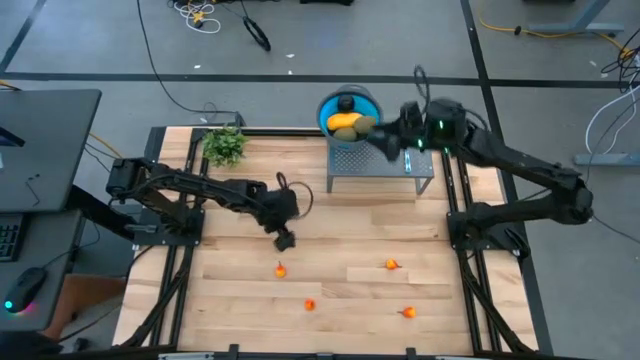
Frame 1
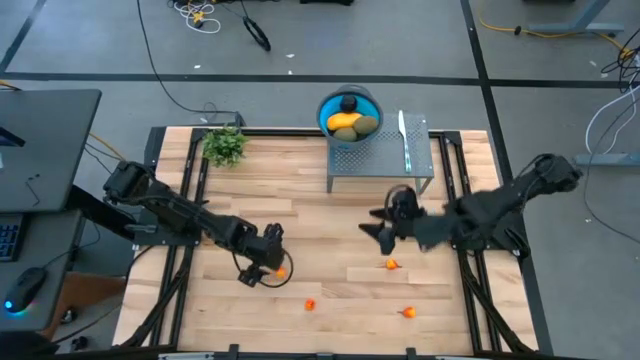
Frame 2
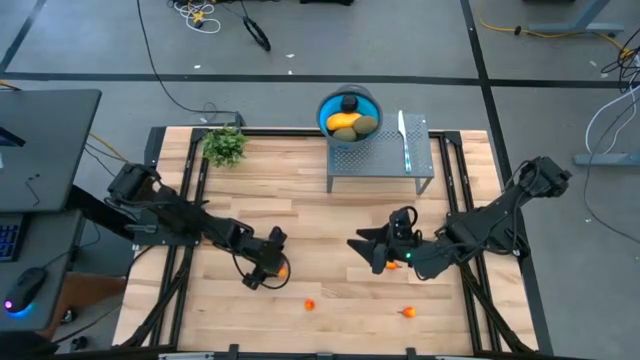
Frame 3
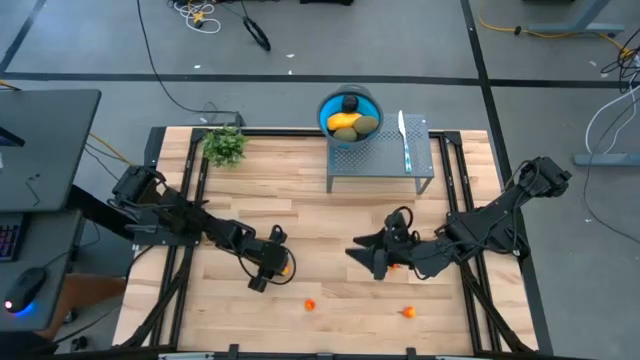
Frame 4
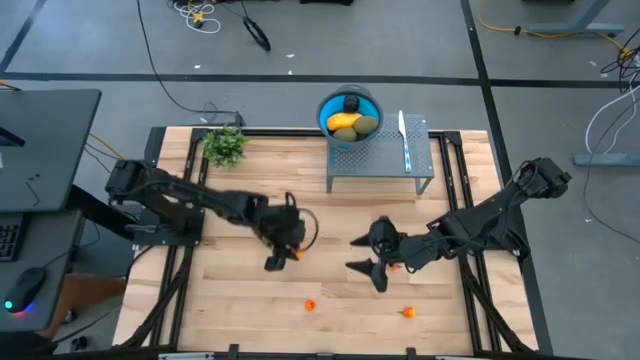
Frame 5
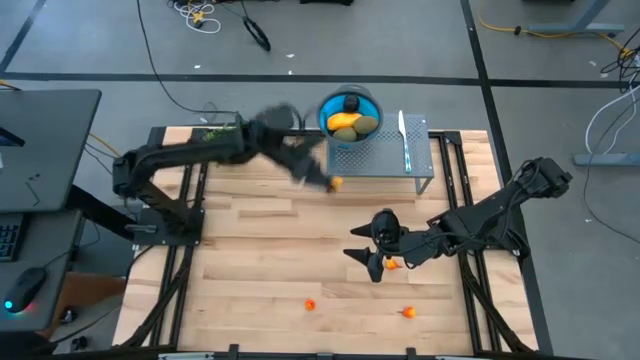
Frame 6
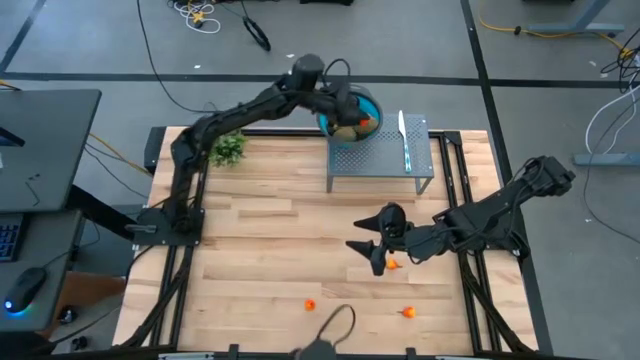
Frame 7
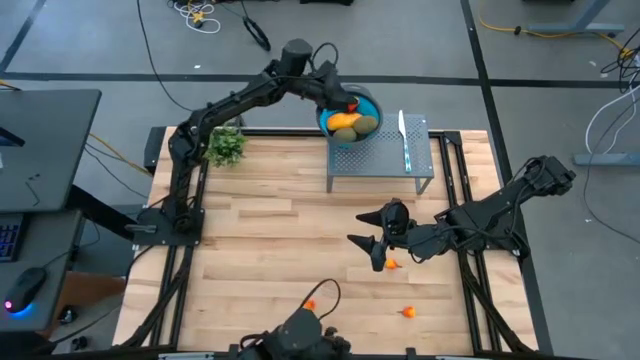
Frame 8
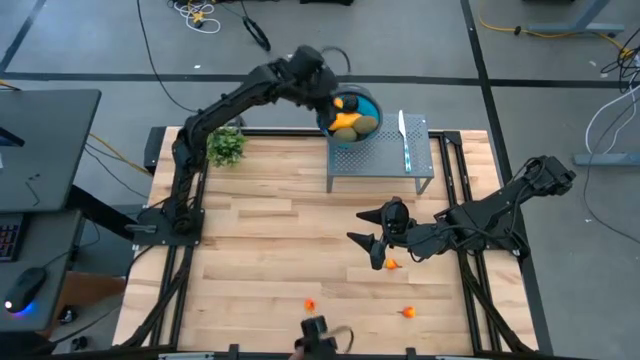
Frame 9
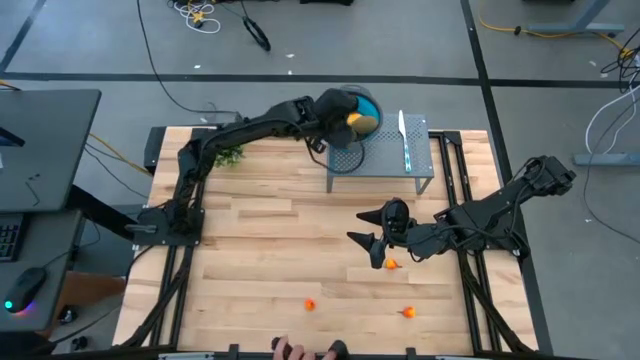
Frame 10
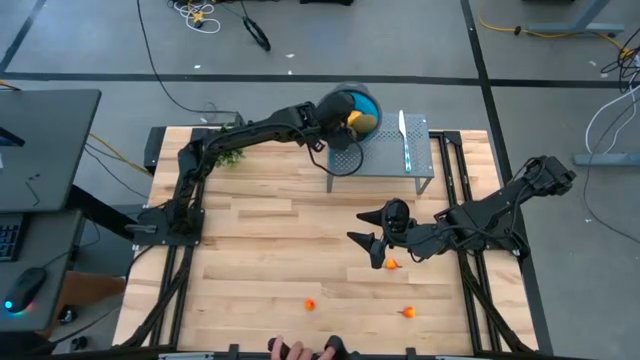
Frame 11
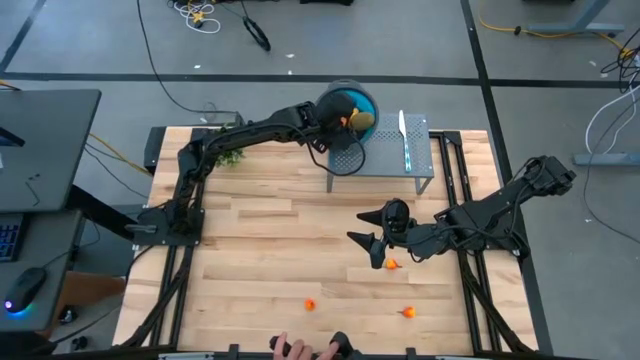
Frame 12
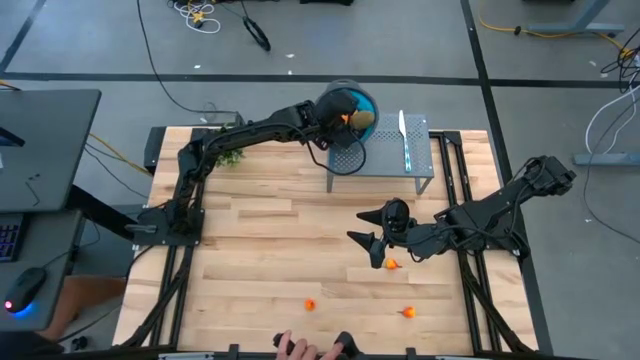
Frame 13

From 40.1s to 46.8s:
Task: Pick & Place Fruit
Put the pear into the strainer bowl

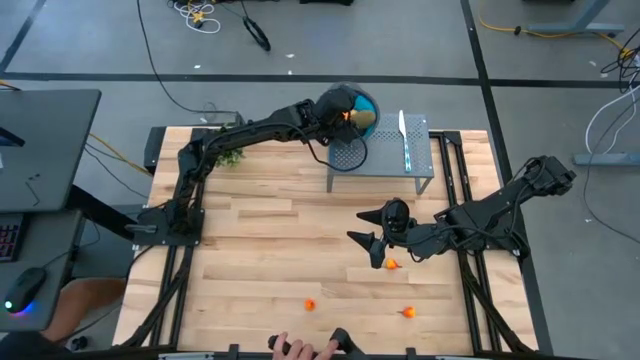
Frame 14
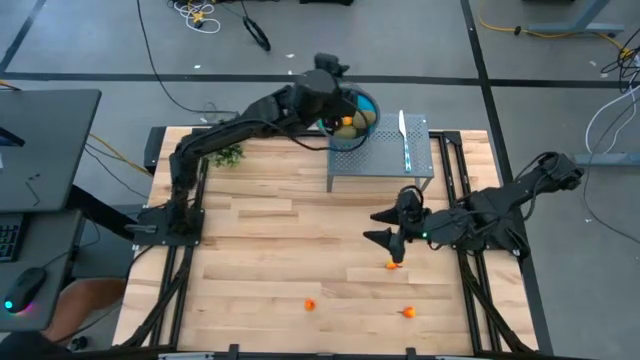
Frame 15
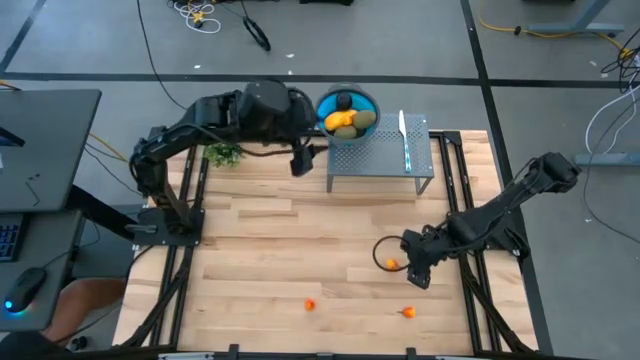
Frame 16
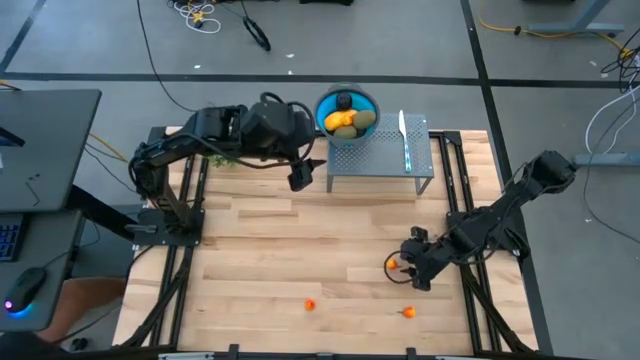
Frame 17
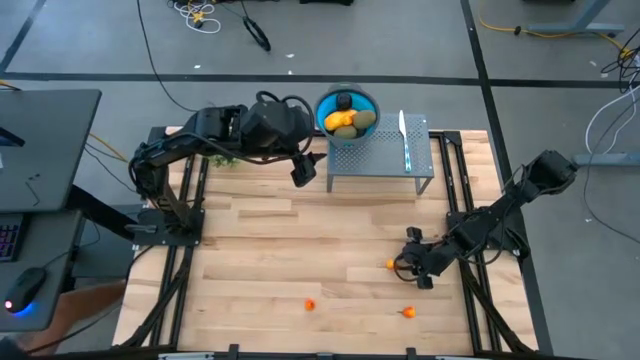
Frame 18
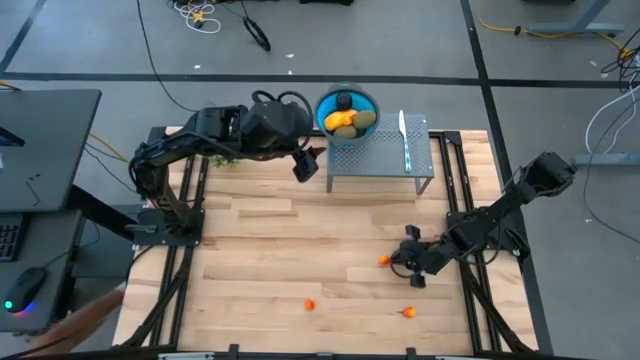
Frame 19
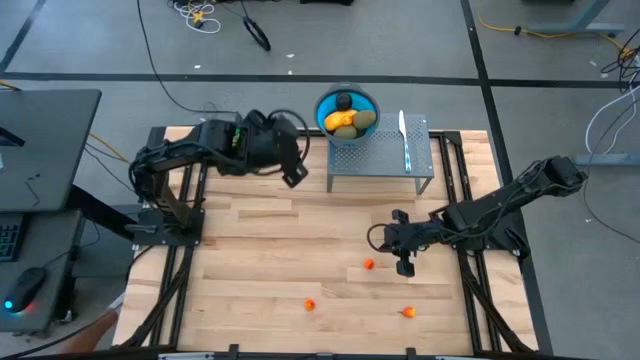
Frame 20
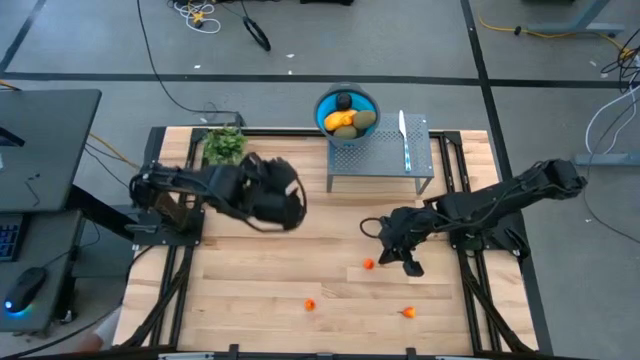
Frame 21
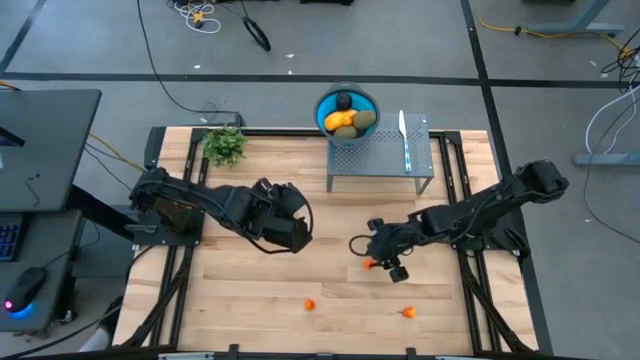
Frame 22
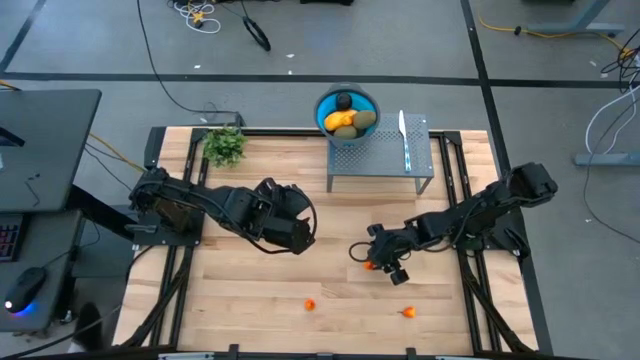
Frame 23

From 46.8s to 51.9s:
Put the pear into the strainer bowl

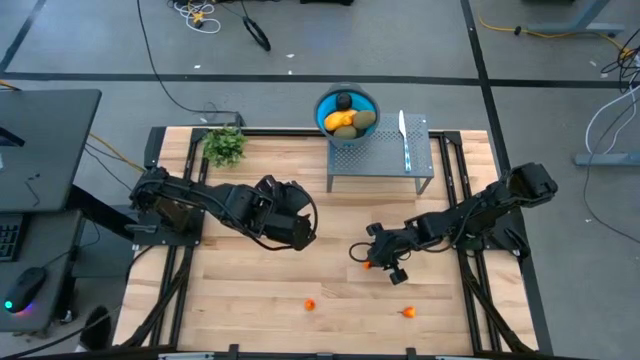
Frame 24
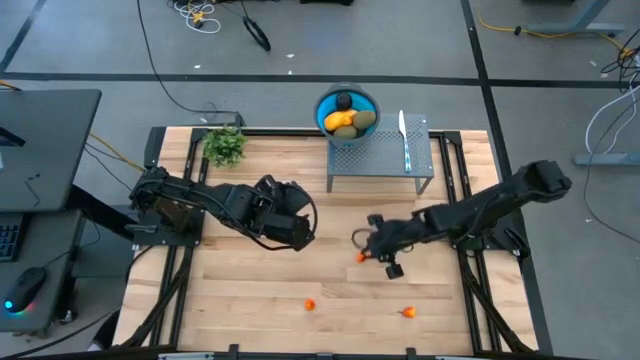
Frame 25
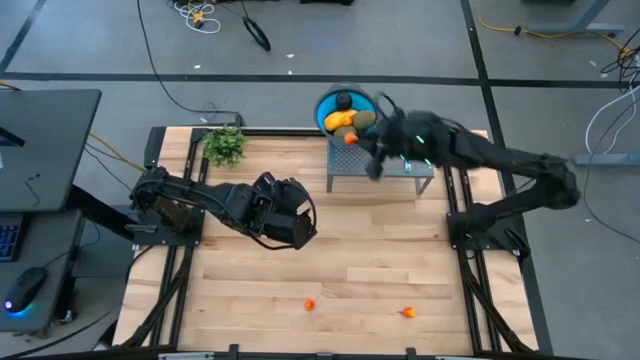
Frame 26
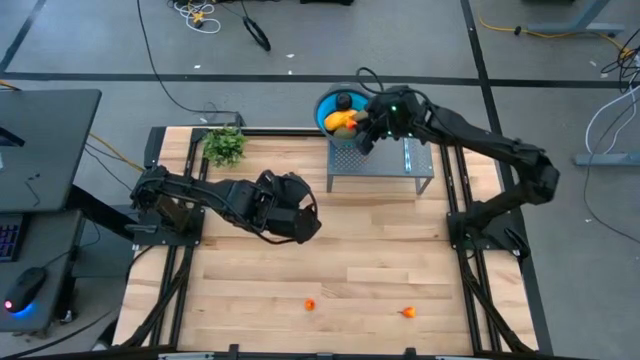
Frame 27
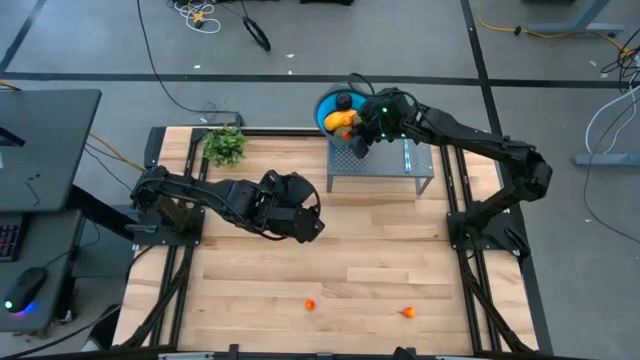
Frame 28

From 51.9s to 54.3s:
Put the pear into the strainer bowl

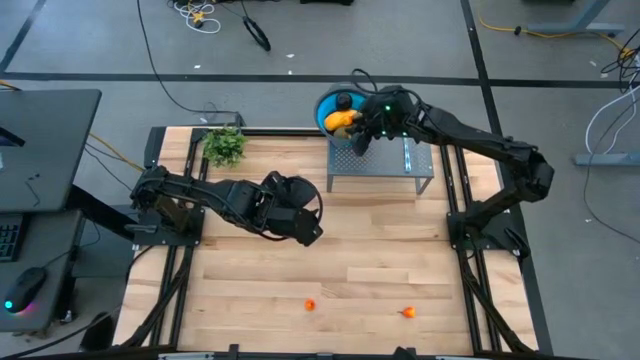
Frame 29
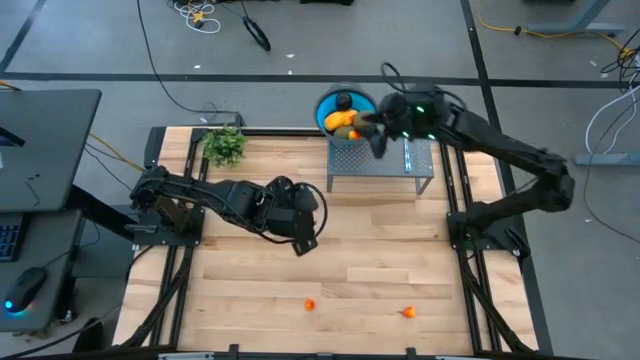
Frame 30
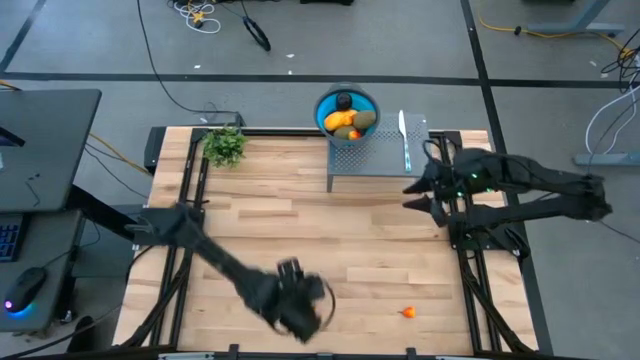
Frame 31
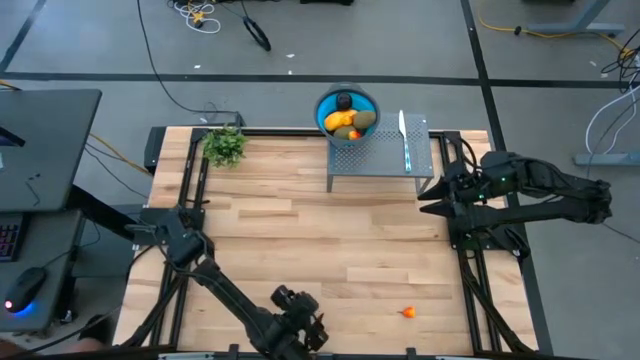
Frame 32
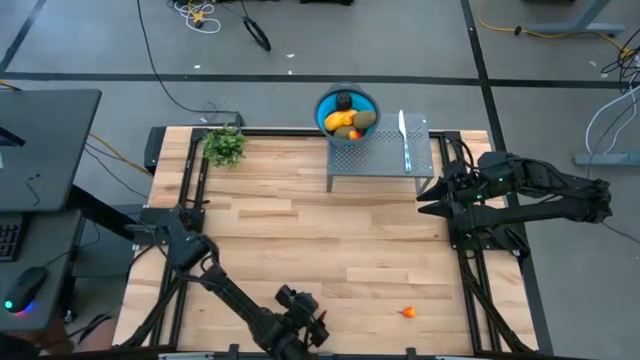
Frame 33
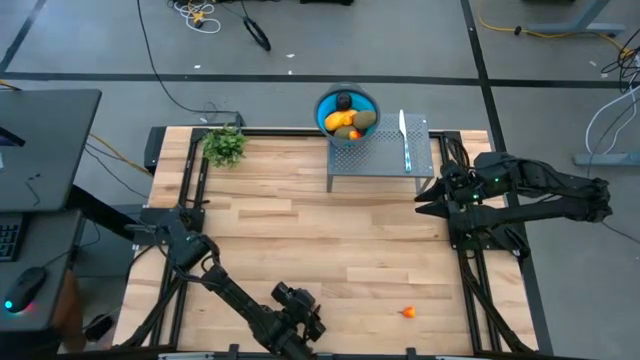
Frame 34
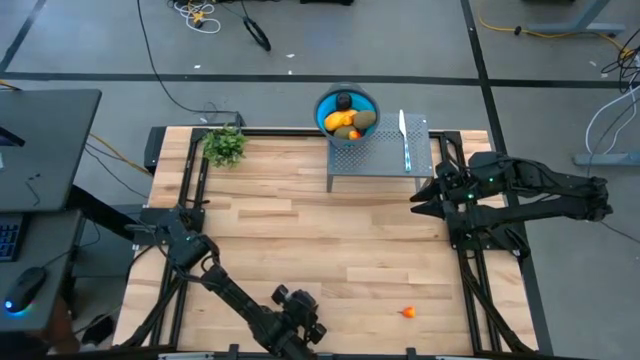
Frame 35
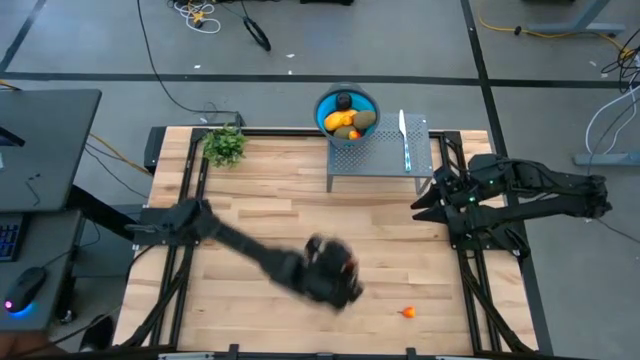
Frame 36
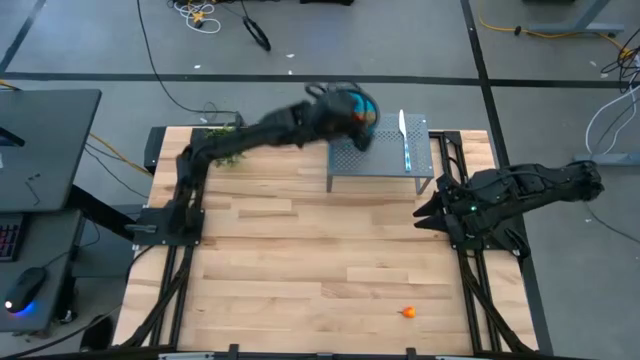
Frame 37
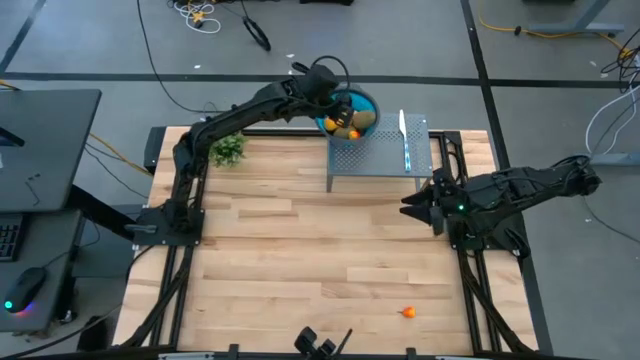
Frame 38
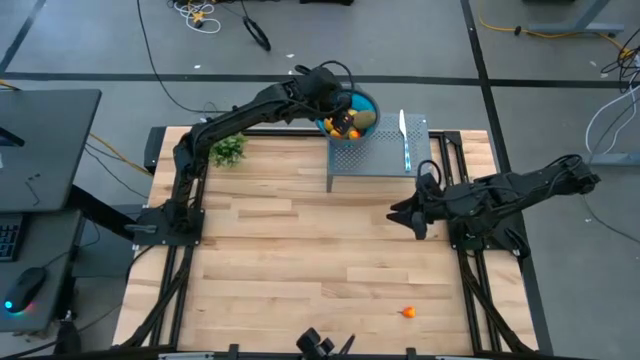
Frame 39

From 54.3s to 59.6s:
Put the pear into the strainer bowl

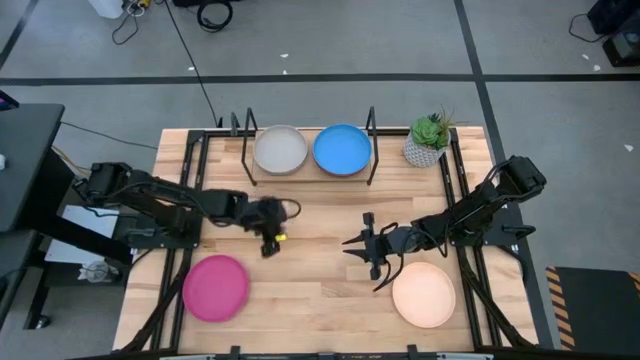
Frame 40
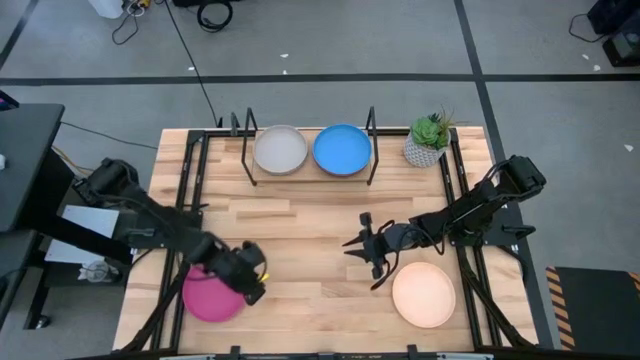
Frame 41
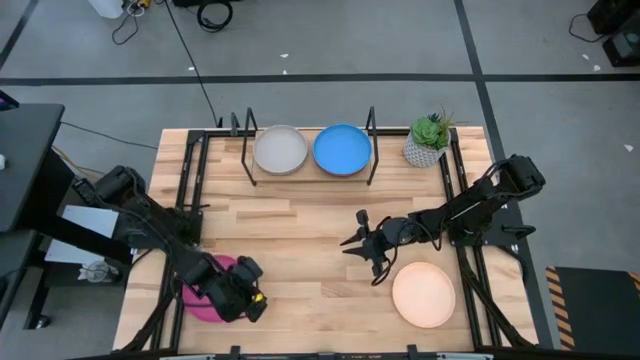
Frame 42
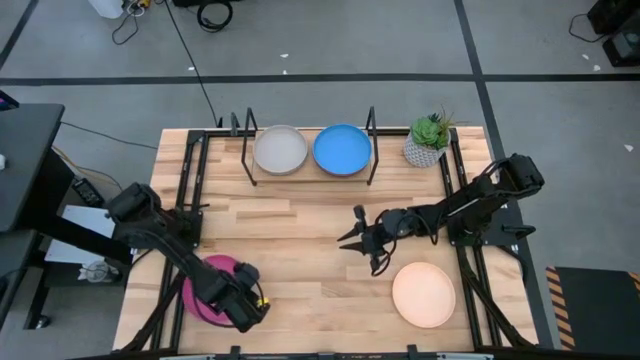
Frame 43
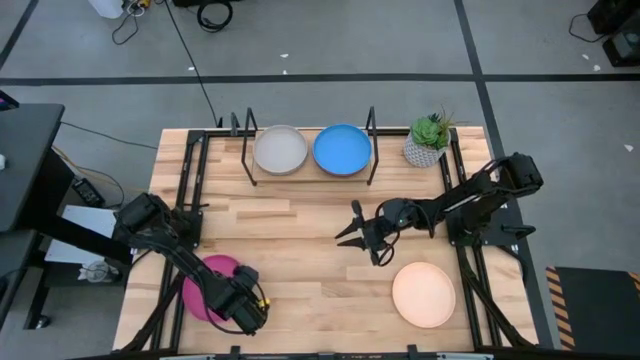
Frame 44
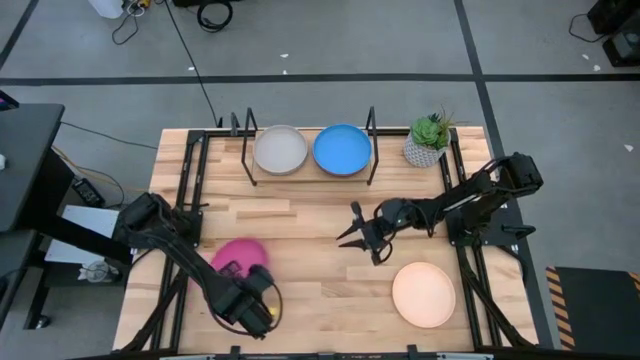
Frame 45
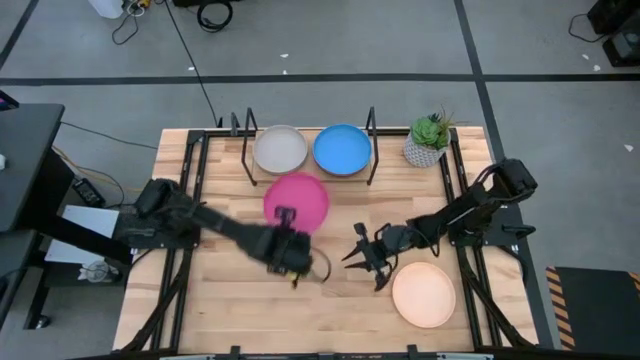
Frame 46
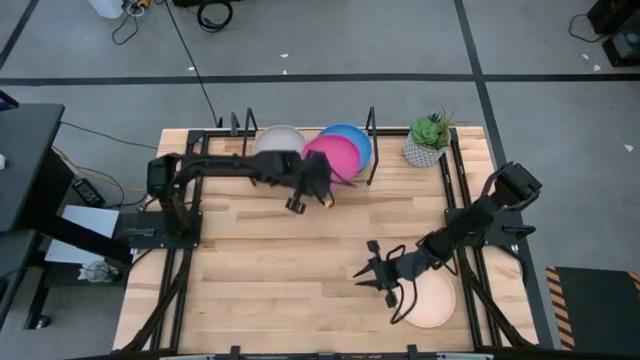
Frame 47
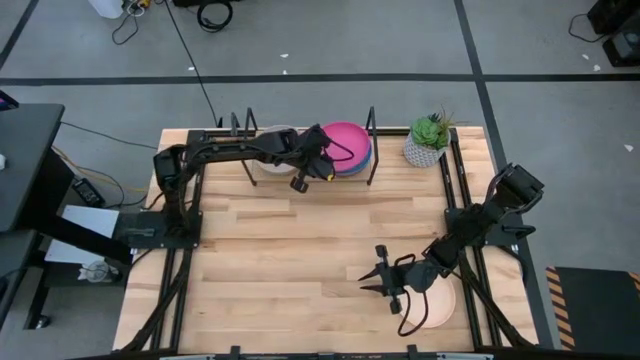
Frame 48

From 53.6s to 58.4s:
Task: Place and stack plates onto a shelf
Stack the pink plate on top of the blue plate on the shelf
